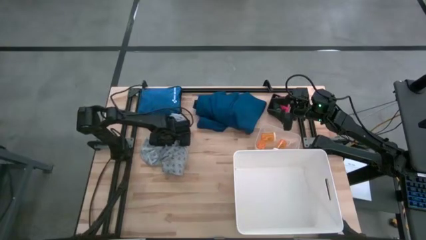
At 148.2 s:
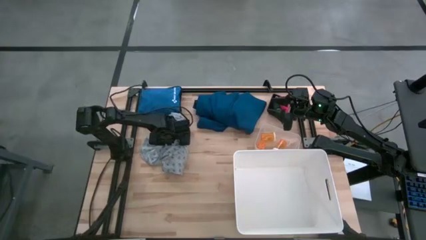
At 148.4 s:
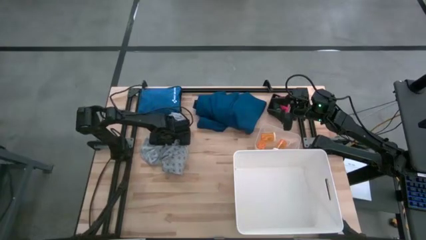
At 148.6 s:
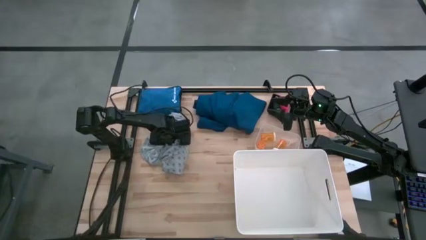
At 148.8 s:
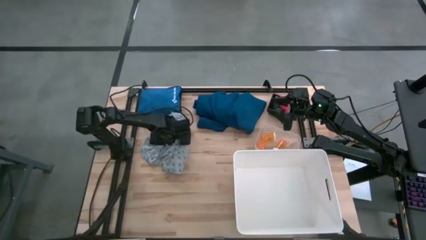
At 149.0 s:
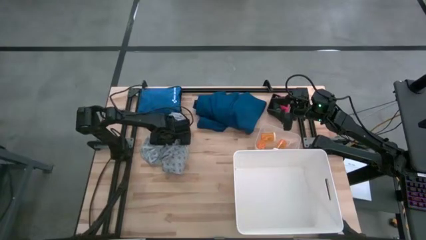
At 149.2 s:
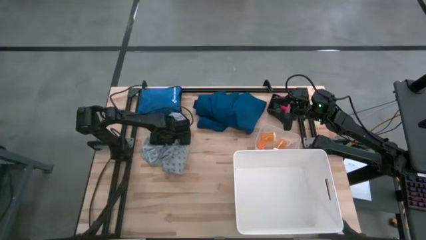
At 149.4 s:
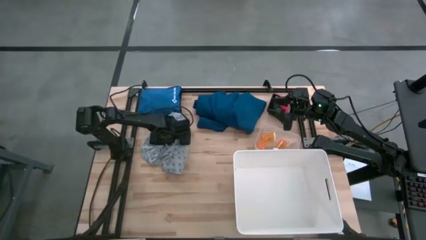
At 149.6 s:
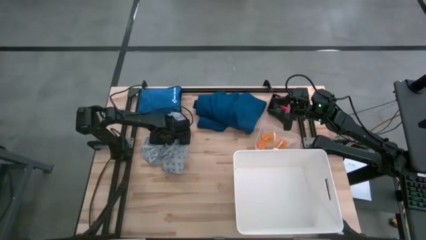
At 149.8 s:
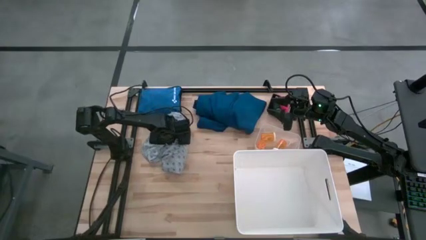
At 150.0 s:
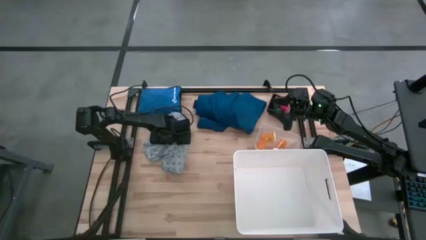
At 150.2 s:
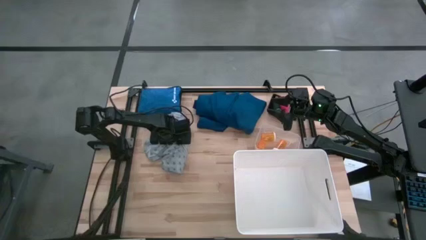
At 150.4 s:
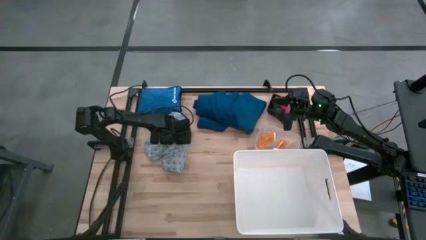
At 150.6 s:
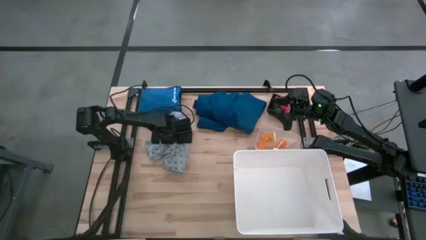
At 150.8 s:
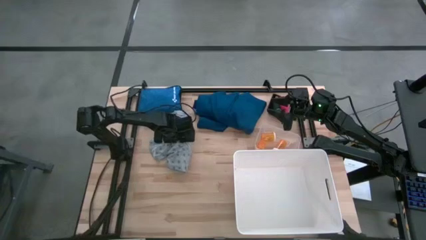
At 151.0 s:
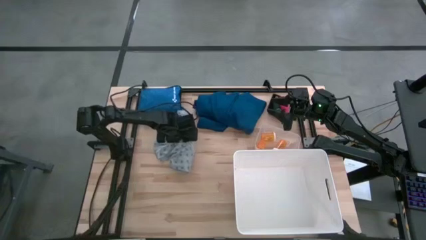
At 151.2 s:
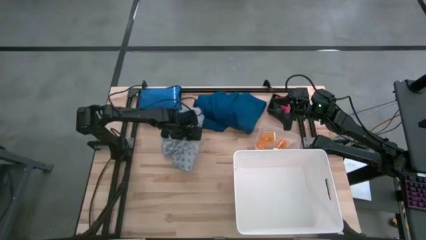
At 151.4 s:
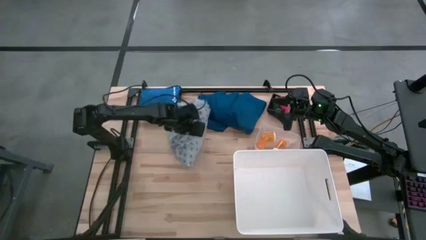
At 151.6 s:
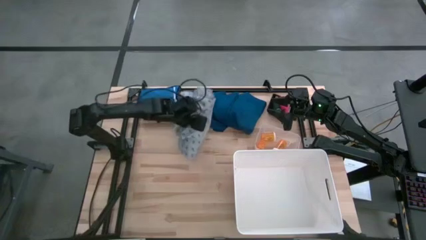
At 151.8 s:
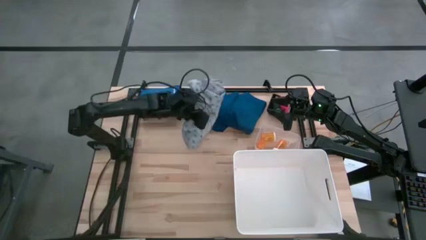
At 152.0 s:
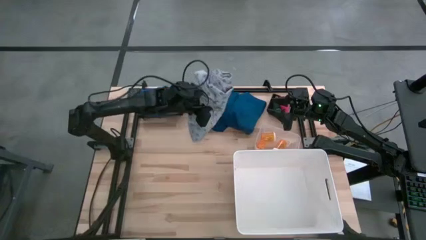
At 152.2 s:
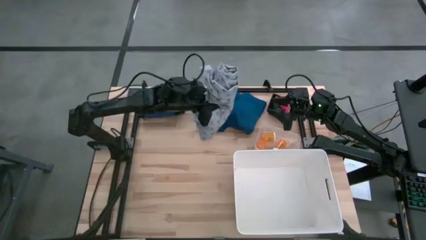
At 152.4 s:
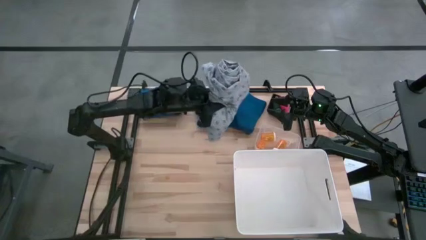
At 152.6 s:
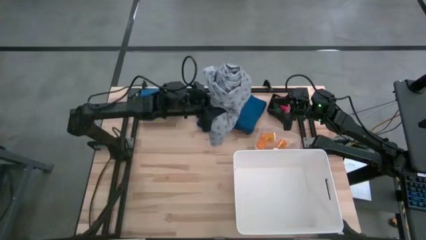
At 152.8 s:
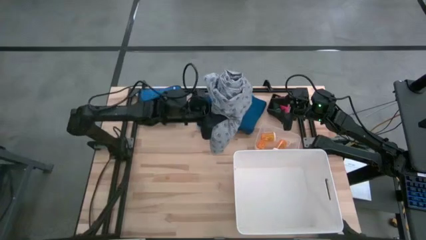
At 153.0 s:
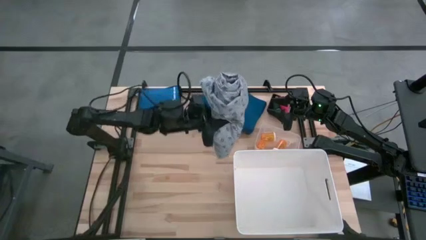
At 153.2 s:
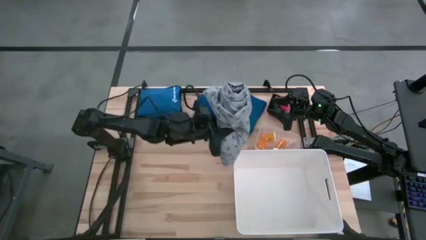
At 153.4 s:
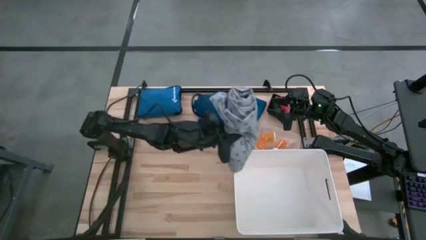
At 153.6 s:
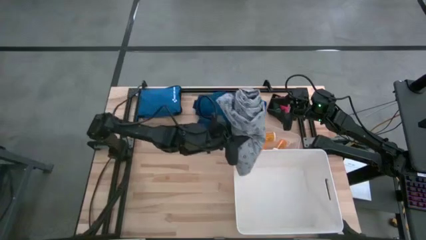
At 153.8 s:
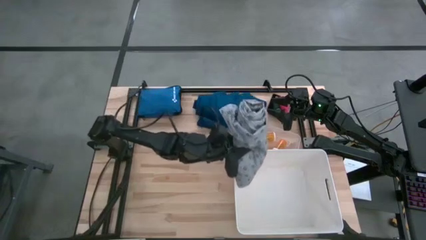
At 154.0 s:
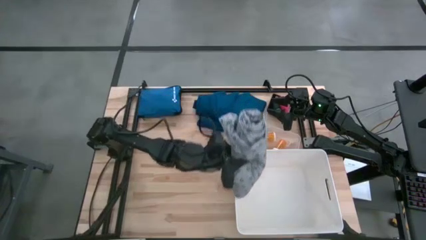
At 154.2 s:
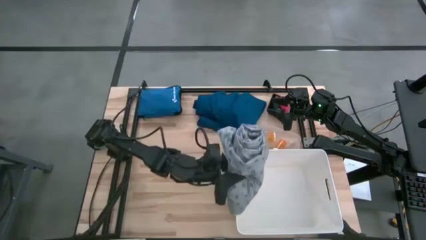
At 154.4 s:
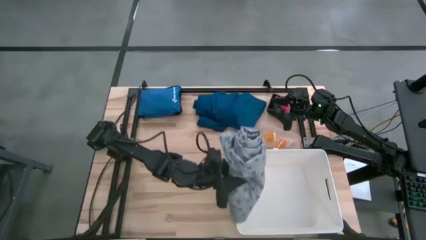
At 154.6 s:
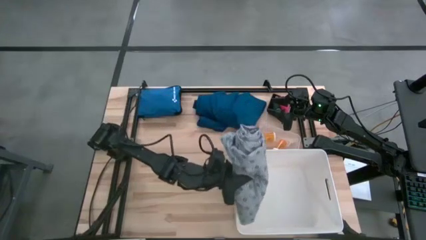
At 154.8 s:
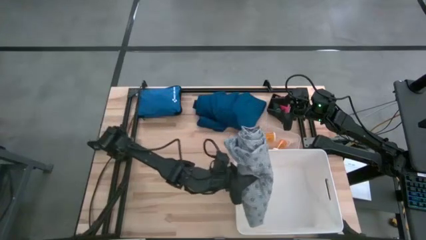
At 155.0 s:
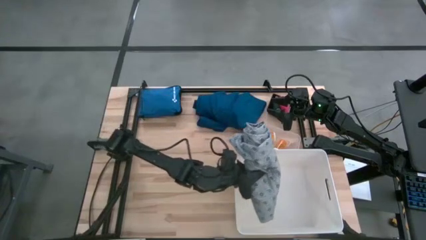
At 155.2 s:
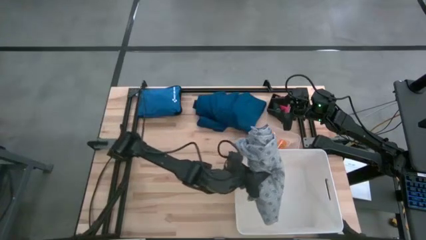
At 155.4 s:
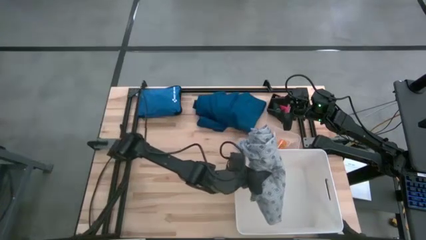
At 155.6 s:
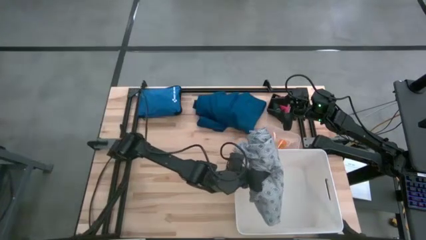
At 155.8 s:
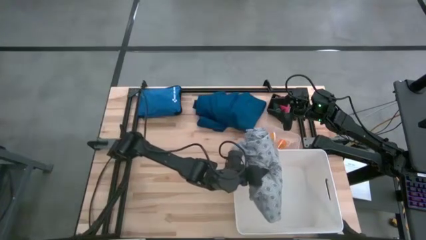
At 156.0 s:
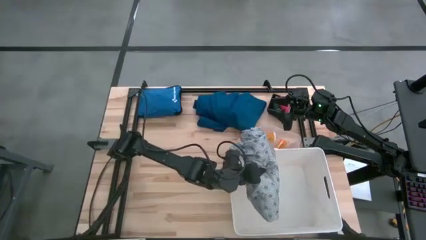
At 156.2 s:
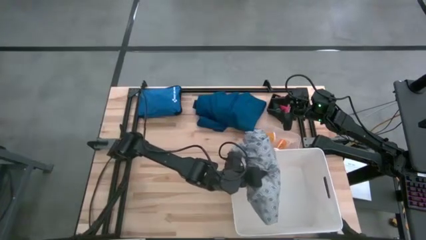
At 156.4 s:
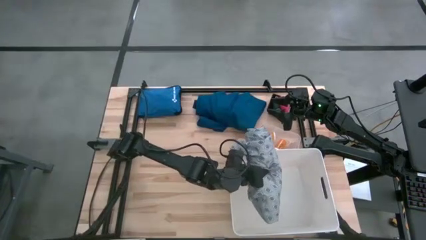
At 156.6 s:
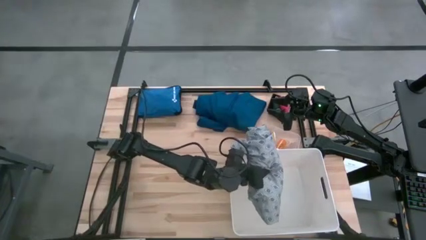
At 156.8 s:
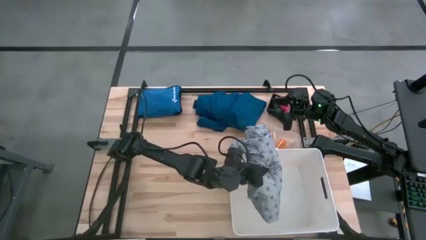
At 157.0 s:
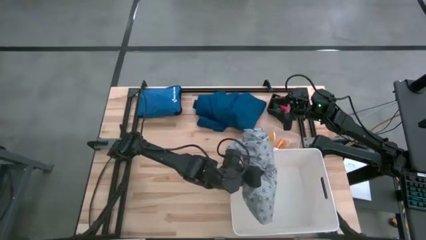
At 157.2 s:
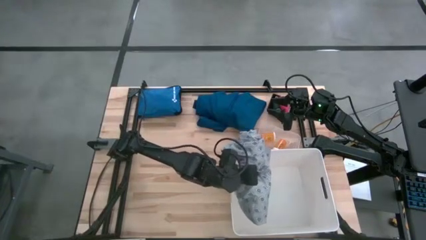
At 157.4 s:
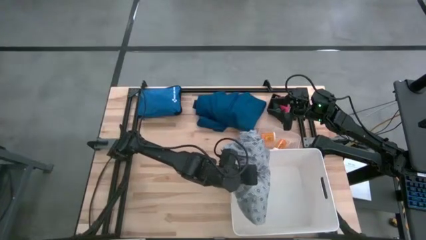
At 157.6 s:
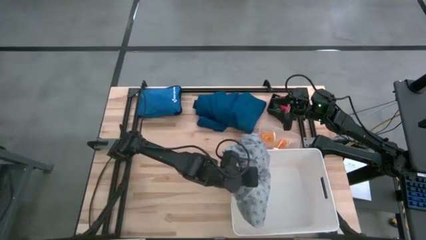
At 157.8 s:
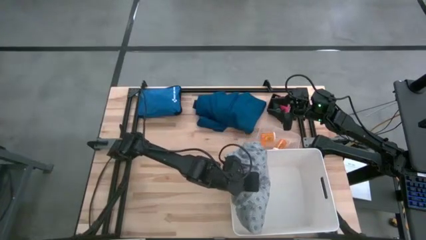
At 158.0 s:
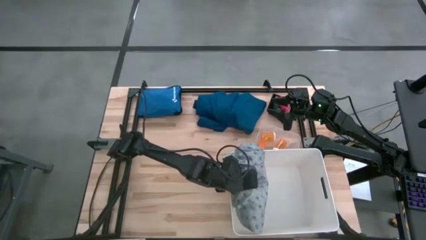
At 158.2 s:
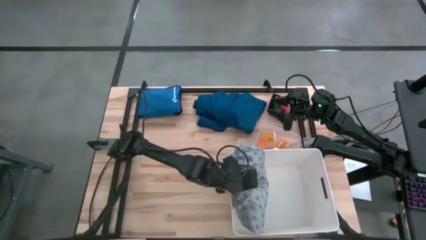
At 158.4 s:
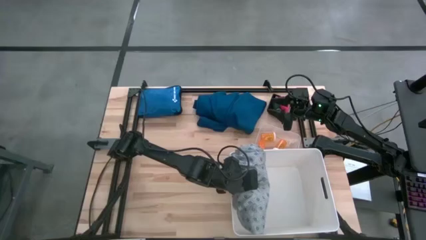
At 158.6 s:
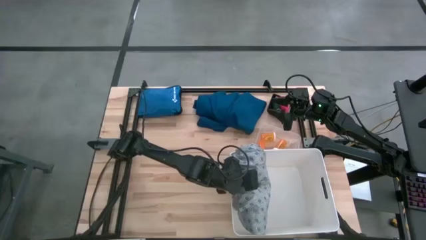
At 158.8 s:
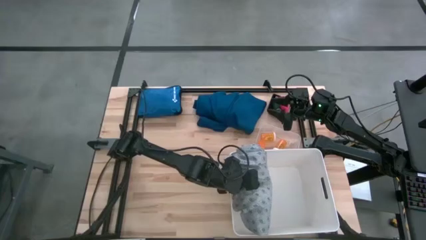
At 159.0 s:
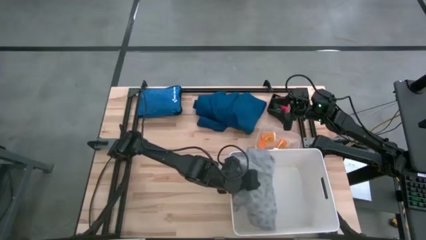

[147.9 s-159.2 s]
Task: Pick & place medical supplies in basket/bin
Put the gray patterned patient gown into the white bin

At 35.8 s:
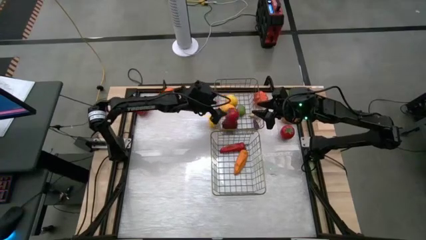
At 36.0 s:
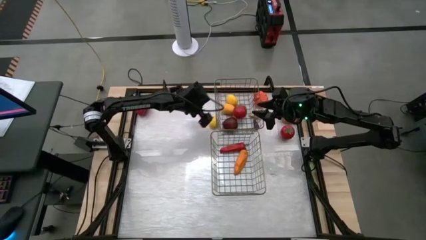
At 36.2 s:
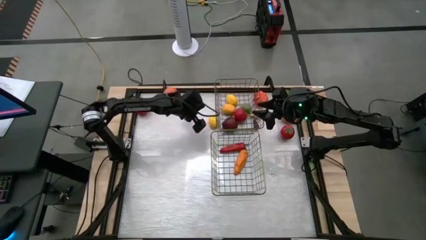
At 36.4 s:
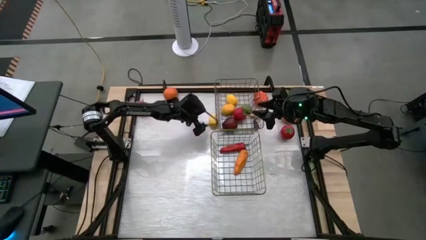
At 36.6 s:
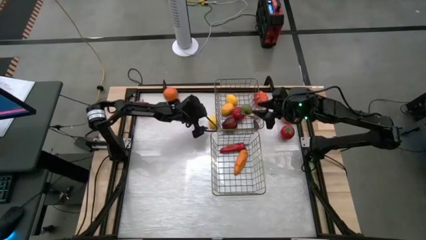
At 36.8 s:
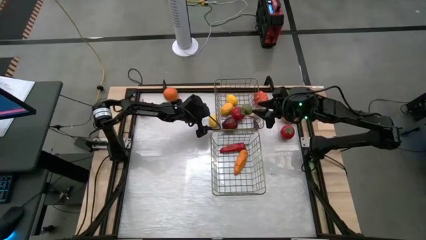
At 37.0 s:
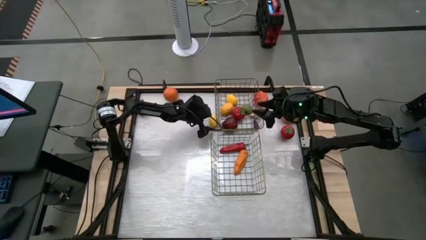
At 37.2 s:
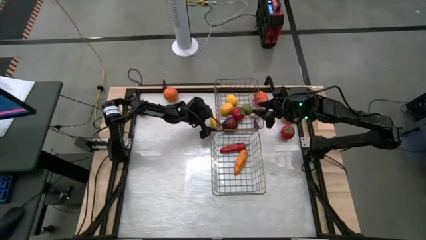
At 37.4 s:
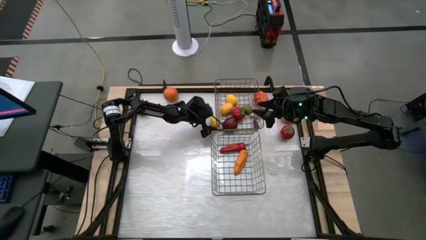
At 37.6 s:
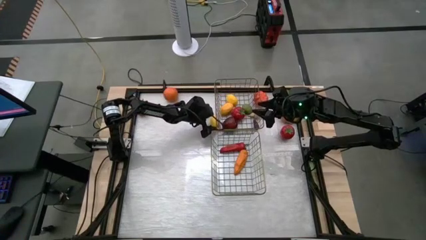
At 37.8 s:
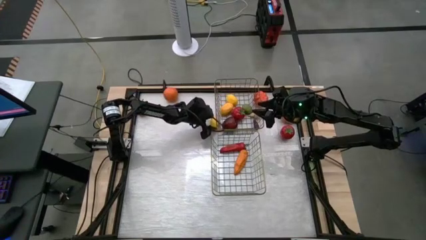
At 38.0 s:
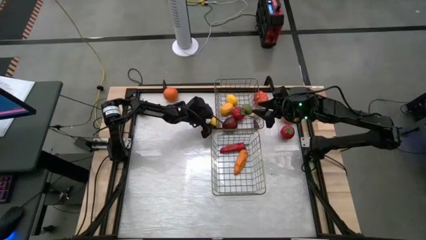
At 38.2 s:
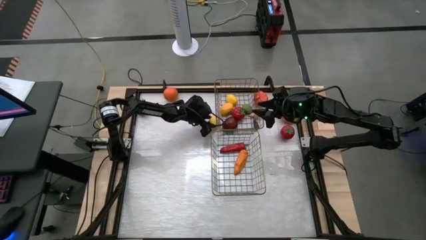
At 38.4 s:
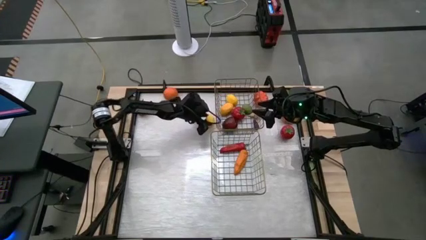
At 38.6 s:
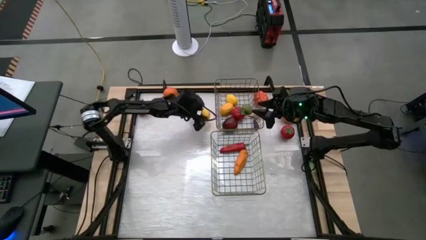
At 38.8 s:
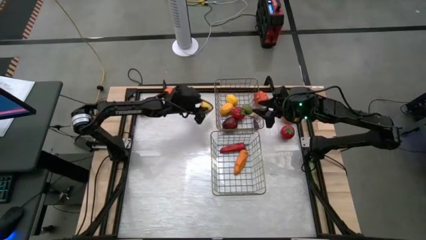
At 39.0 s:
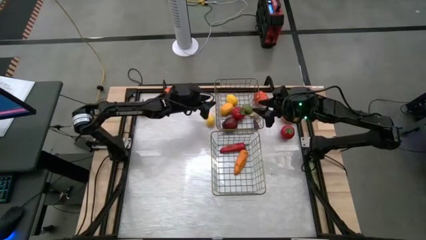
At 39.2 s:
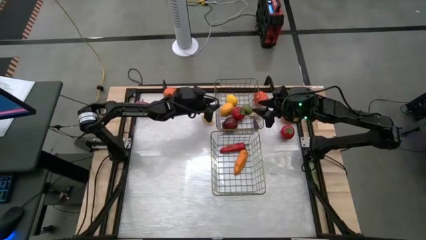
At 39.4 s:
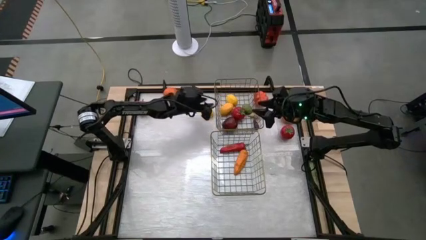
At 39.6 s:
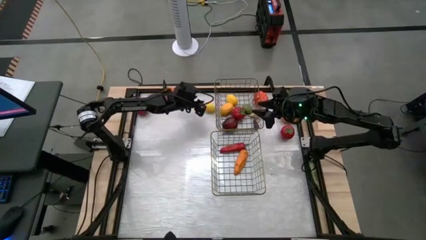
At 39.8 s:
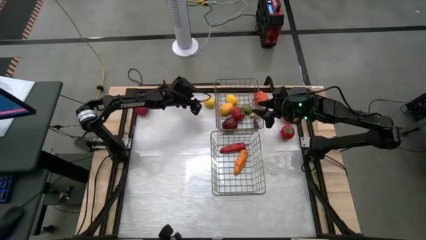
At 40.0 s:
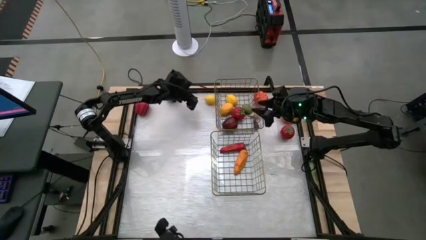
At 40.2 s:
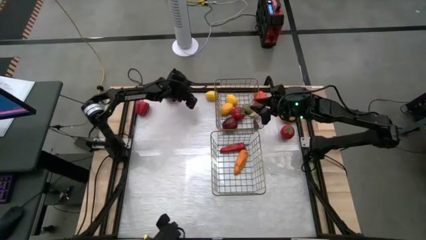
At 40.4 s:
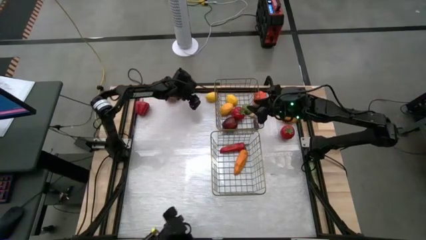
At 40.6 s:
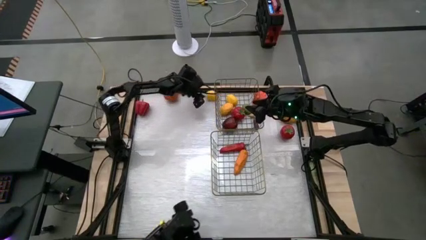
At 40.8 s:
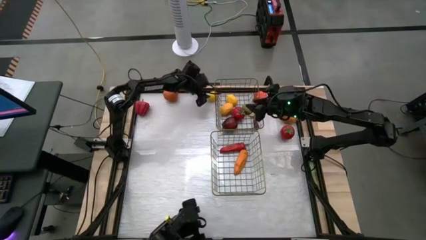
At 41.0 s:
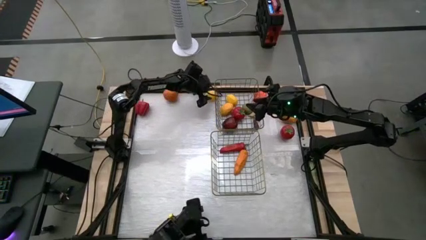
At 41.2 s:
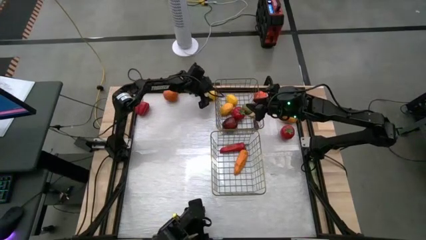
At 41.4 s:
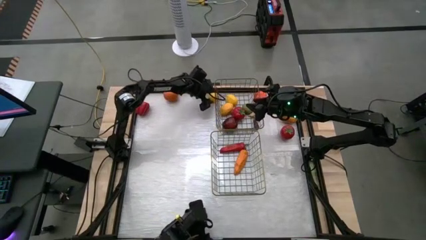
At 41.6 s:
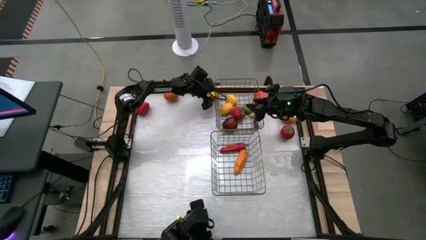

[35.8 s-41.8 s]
Task: Sort produce into baskets
Put the yellow lemon into the top wire basket

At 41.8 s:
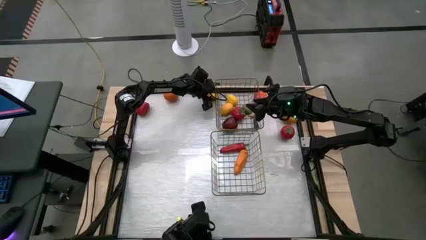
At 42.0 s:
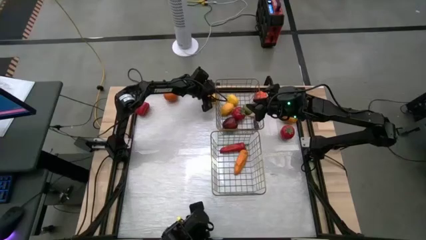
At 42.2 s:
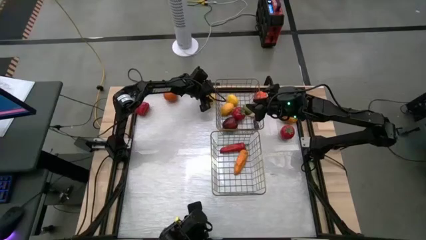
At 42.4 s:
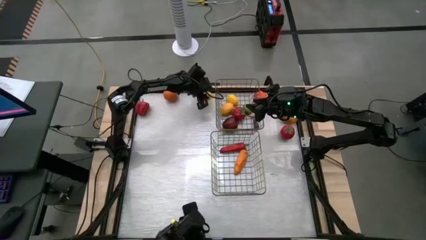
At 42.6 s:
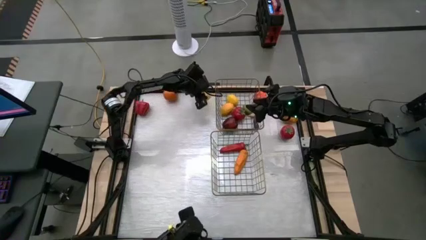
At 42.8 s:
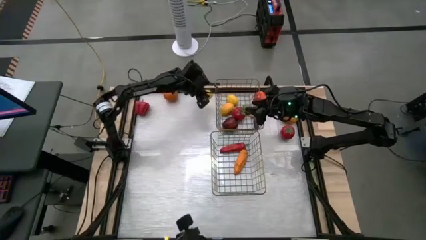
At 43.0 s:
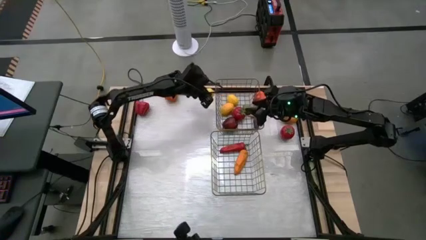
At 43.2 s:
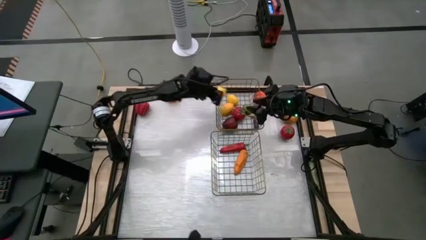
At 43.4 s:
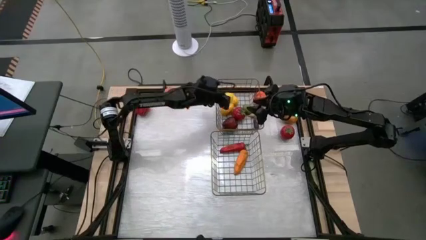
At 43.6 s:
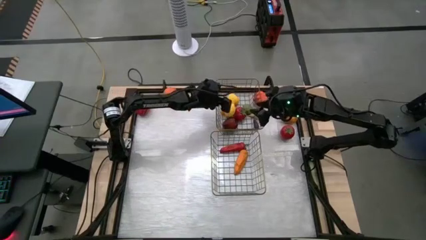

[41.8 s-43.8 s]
Put the yellow lemon into the top wire basket
